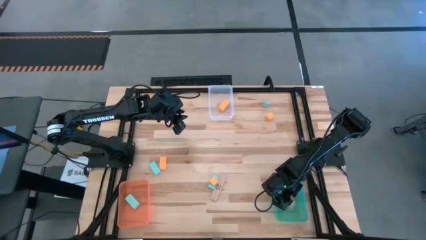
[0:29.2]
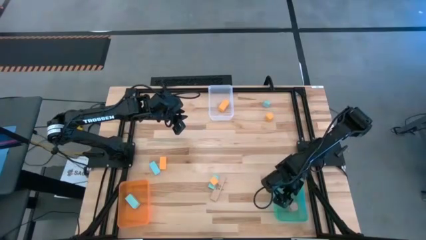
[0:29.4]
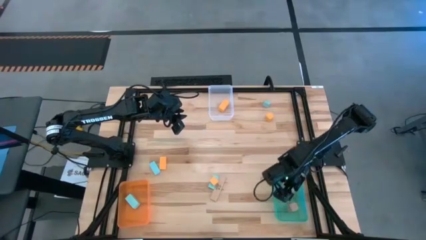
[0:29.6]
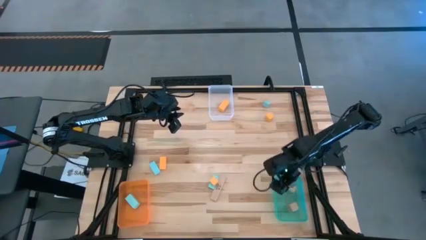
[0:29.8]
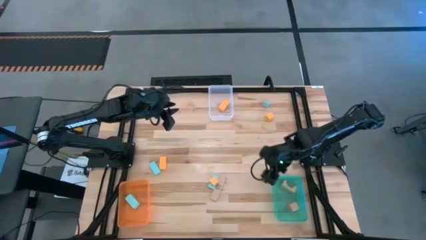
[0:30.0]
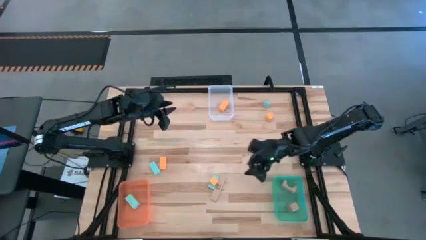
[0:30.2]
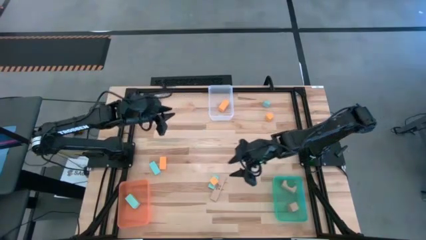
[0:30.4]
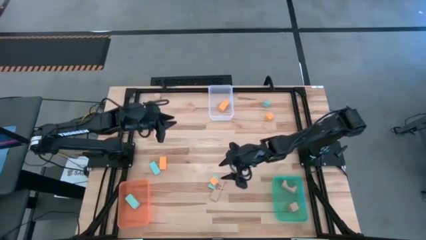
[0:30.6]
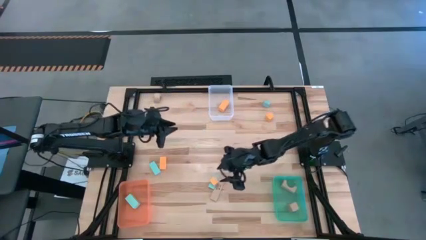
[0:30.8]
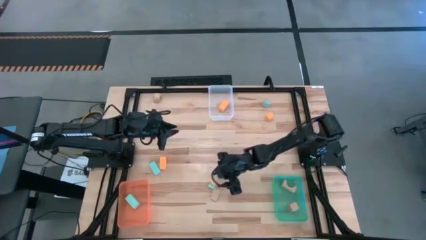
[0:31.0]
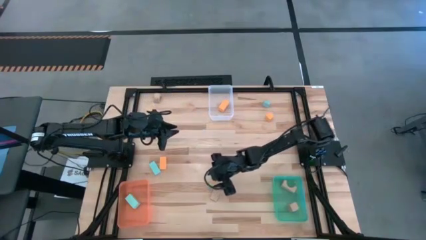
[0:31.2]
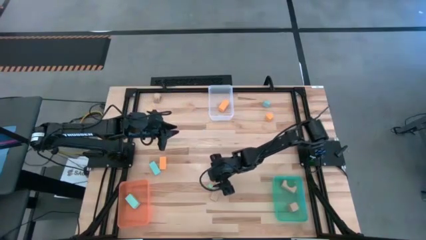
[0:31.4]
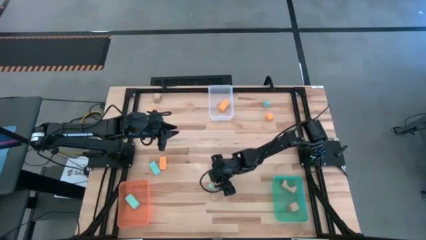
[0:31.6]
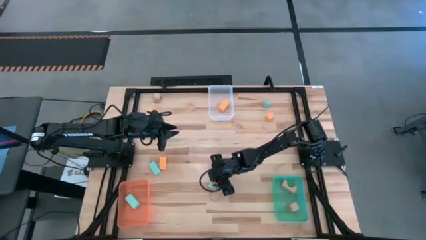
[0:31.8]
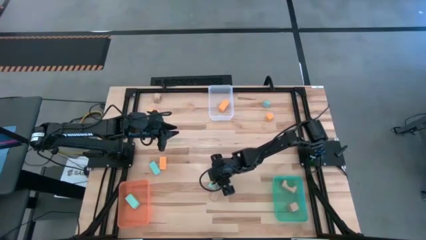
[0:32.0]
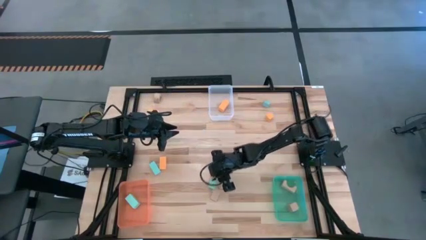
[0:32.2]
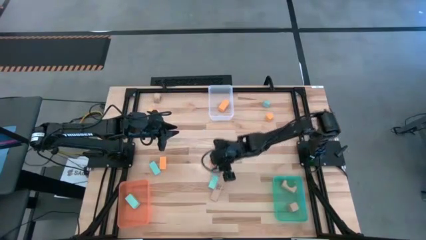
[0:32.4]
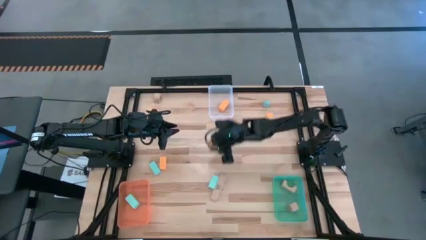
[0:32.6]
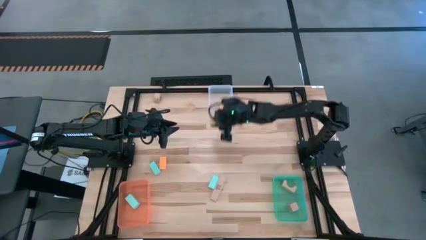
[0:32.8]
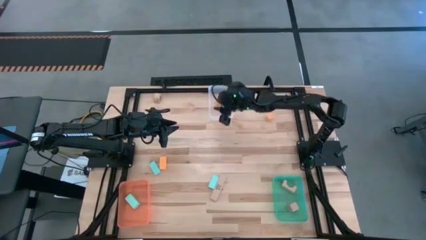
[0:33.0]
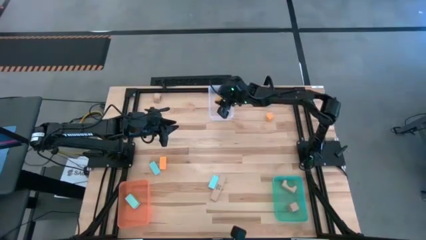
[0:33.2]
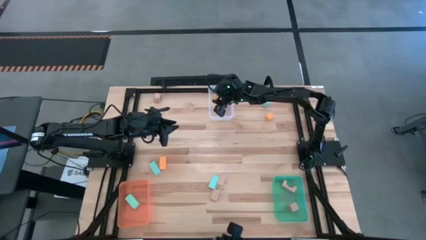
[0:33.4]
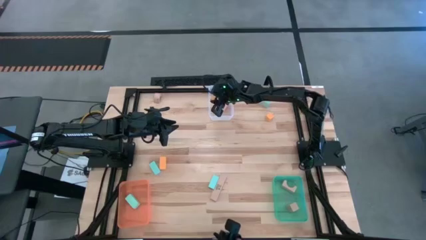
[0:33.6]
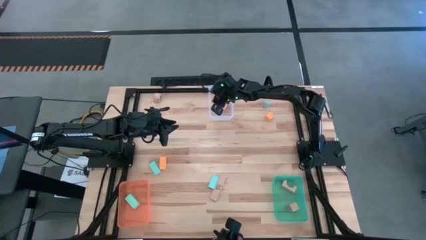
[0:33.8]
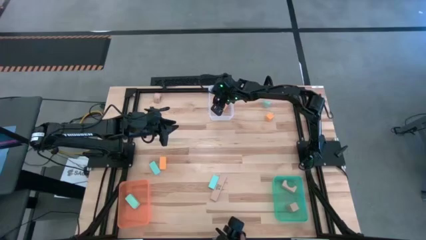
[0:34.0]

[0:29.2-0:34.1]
Task: Sort & place blocks by color
Put the orange block into the transparent white bin

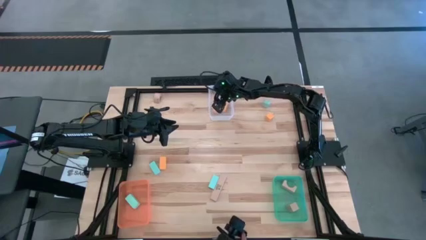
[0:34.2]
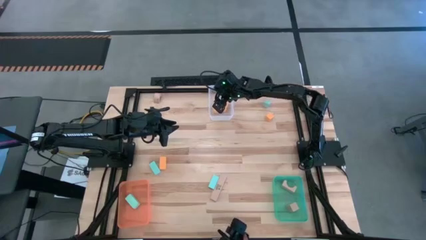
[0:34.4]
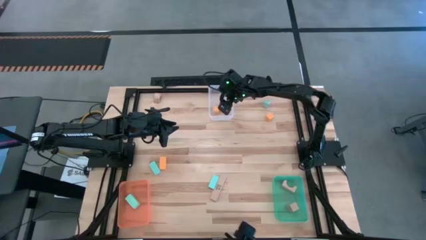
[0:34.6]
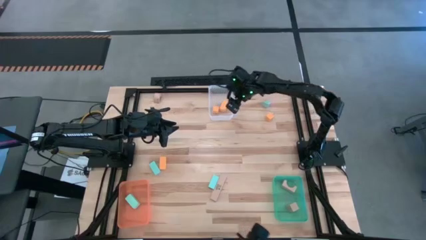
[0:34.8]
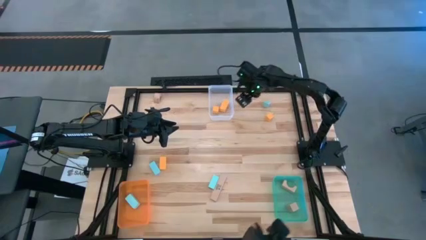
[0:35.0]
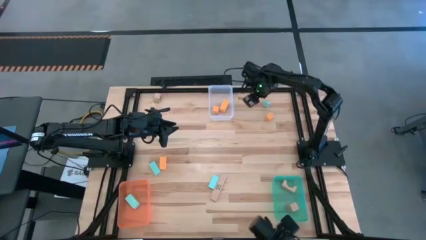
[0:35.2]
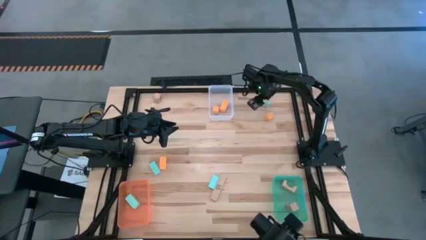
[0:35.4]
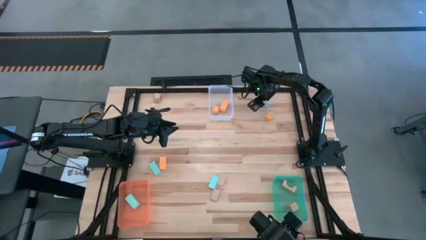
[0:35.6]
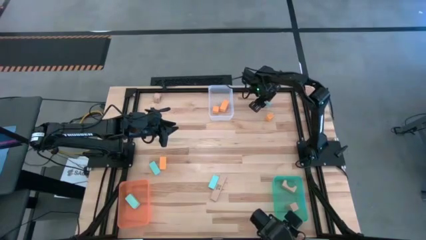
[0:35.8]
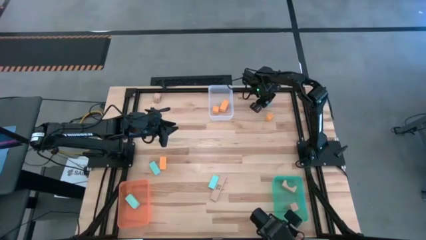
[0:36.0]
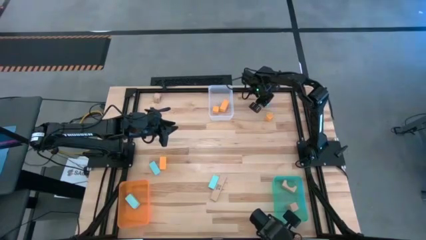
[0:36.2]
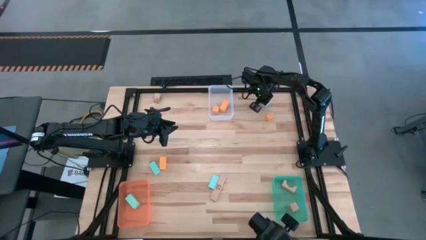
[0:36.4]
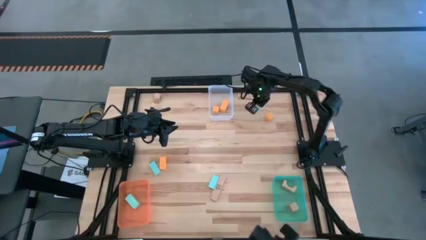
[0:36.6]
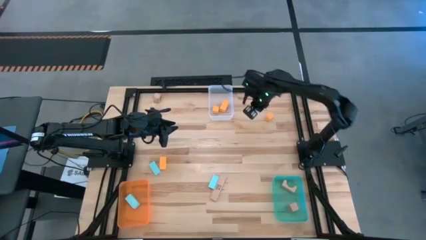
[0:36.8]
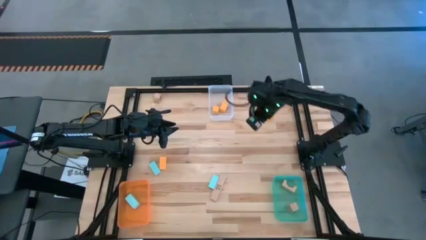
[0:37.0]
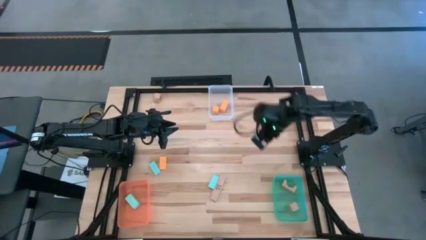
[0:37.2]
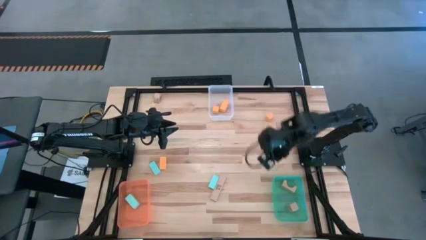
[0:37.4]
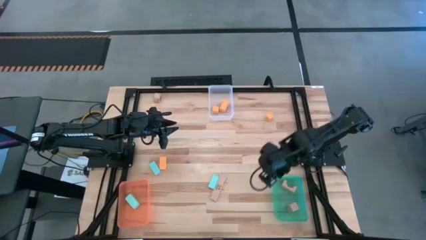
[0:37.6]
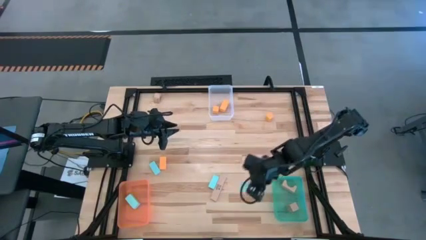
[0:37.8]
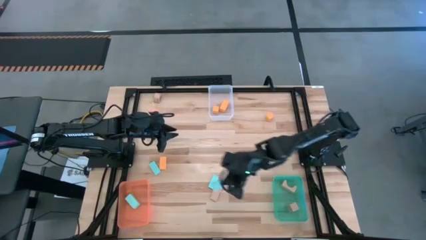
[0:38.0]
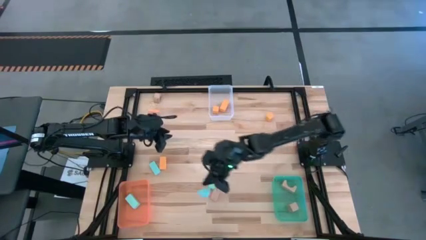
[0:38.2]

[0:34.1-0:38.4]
Put the sky blue block into the transparent orange bin

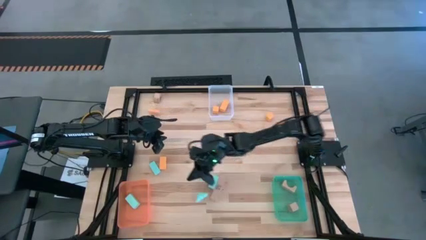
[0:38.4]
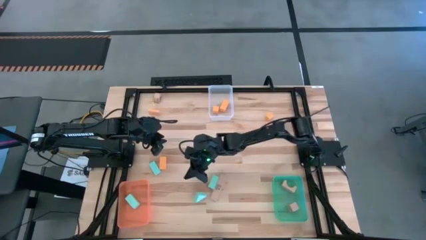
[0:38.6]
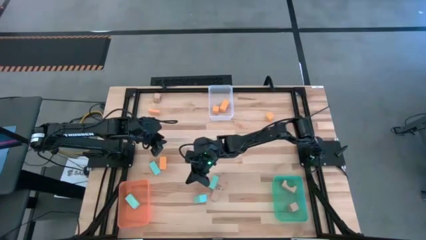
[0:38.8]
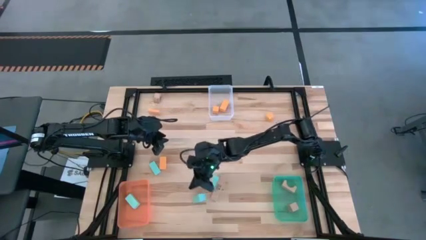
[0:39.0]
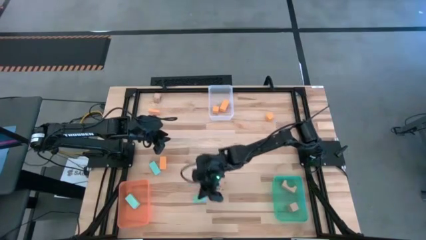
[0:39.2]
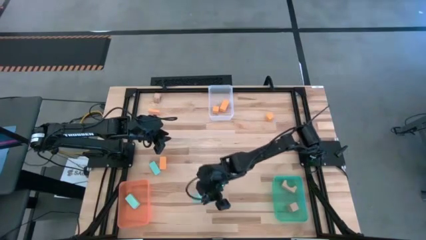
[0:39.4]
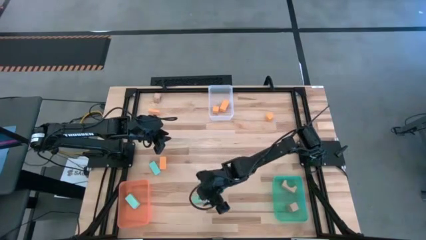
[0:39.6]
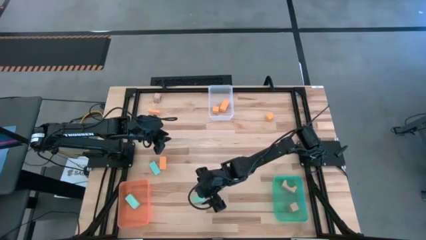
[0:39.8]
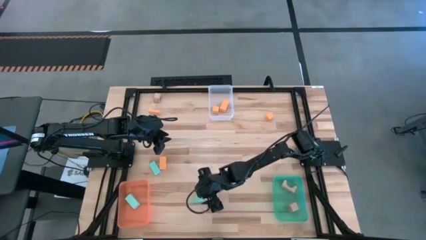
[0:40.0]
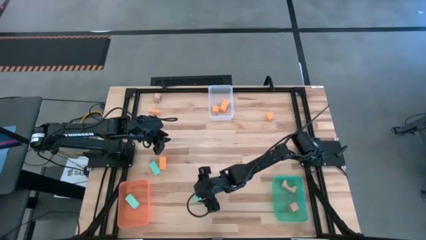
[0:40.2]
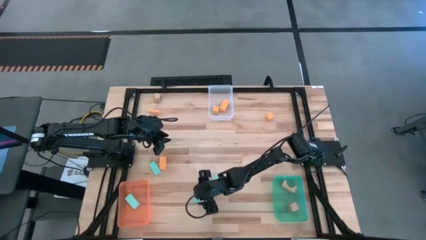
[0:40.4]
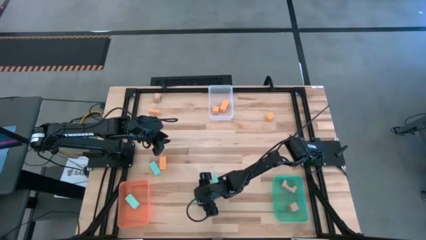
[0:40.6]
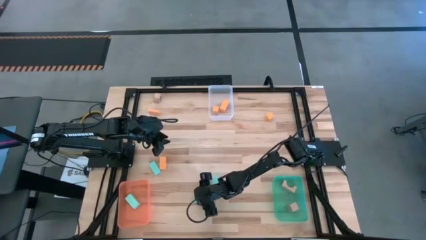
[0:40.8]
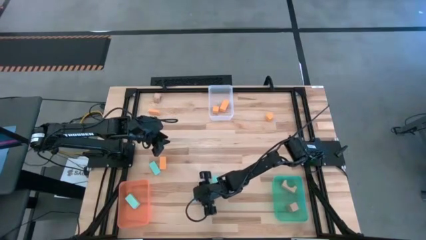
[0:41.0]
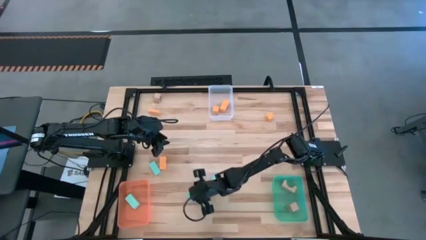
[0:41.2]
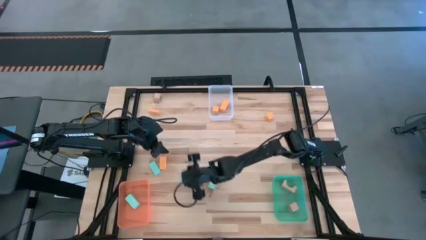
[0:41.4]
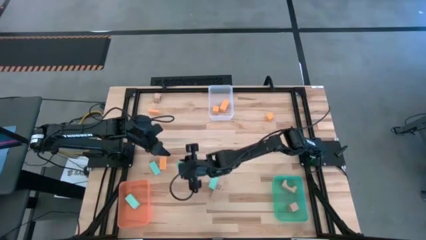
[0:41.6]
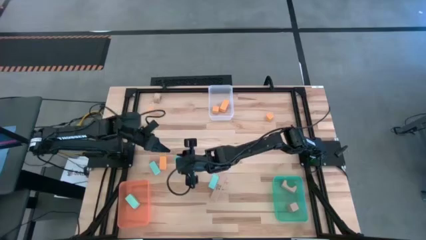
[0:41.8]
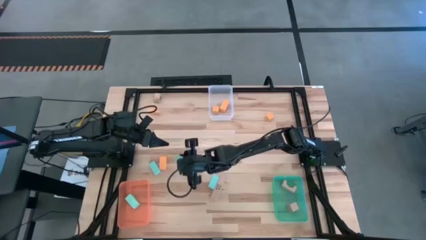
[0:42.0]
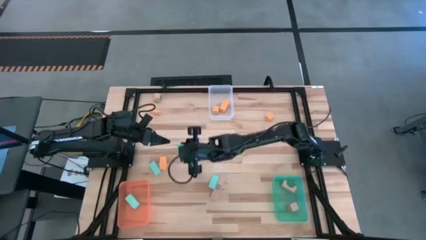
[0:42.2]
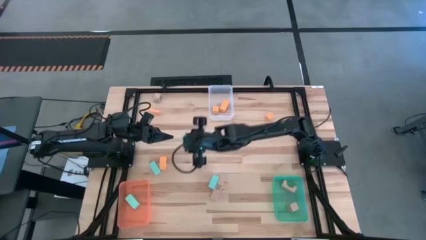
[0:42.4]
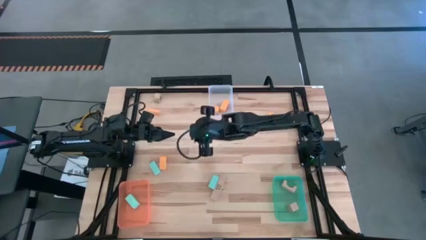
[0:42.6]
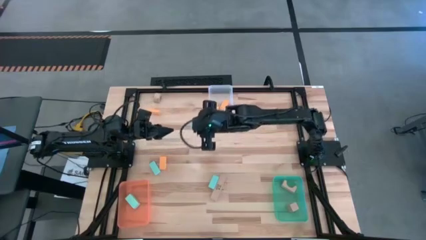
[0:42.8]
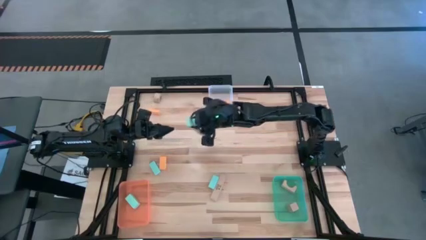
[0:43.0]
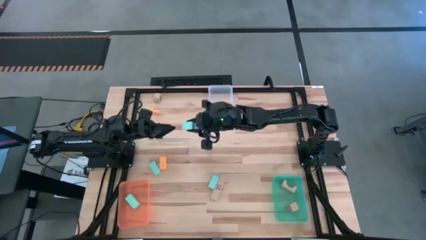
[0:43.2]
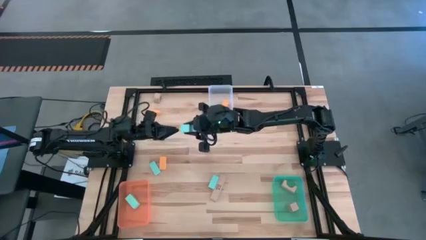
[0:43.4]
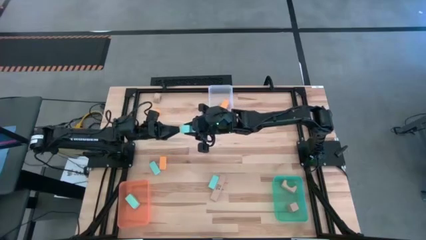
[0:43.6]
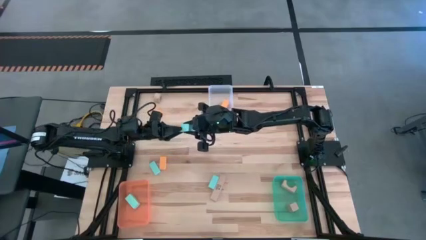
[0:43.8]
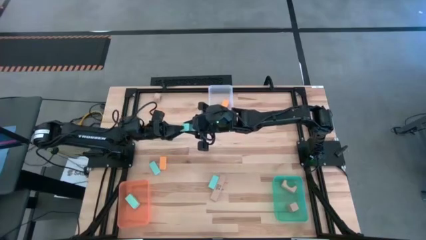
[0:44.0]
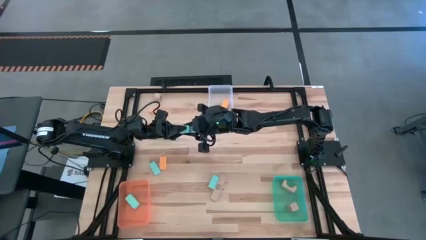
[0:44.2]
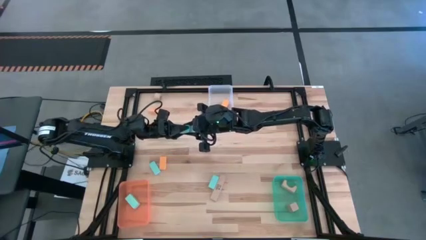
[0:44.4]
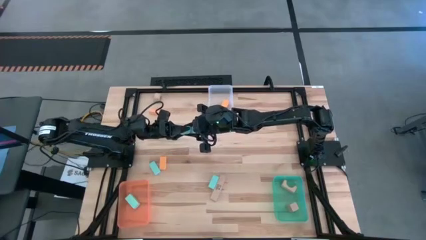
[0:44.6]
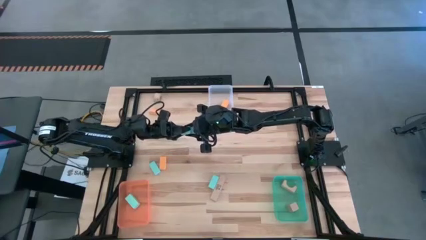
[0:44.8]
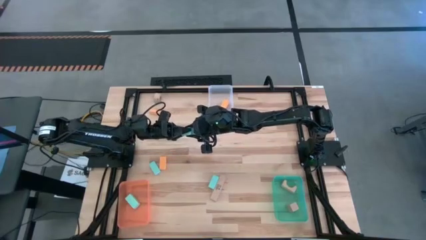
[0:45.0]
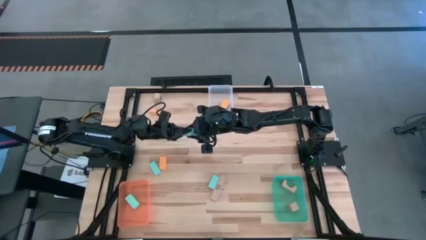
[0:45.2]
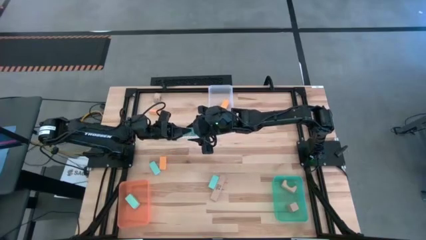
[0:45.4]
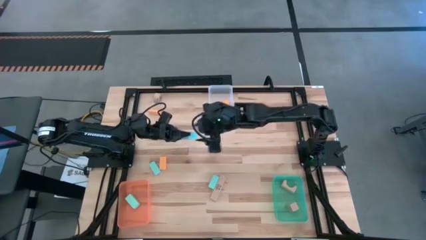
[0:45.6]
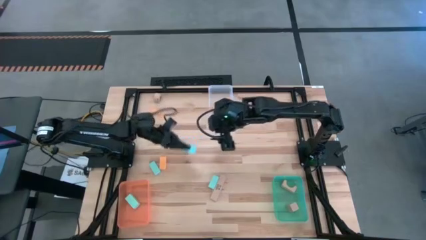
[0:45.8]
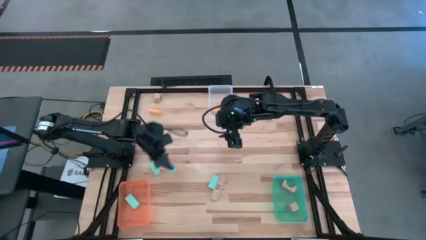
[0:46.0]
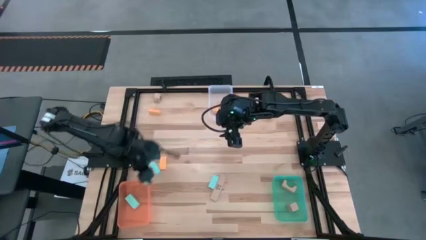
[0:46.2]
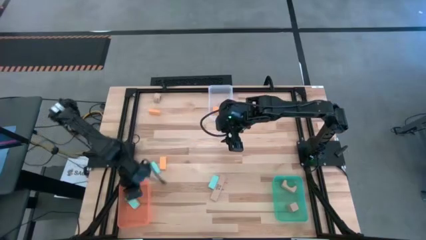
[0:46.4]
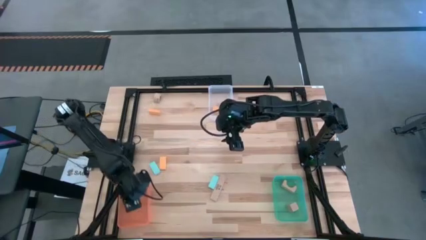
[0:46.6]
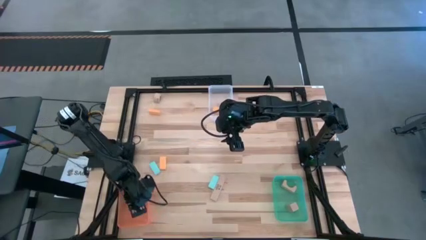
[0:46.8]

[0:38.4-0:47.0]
Put the sky blue block into the transparent orange bin
